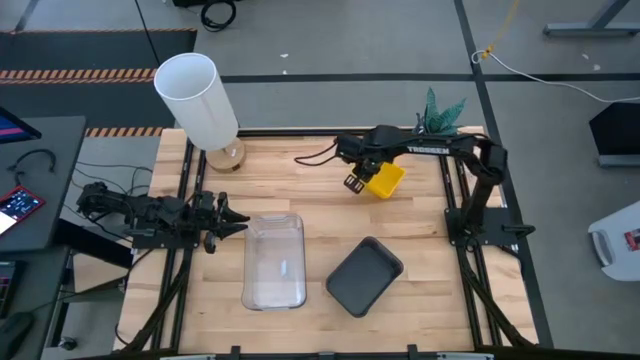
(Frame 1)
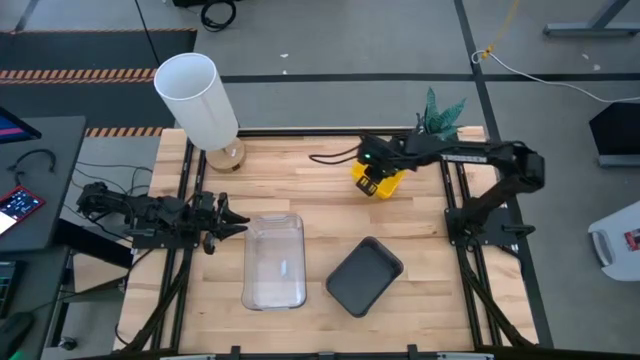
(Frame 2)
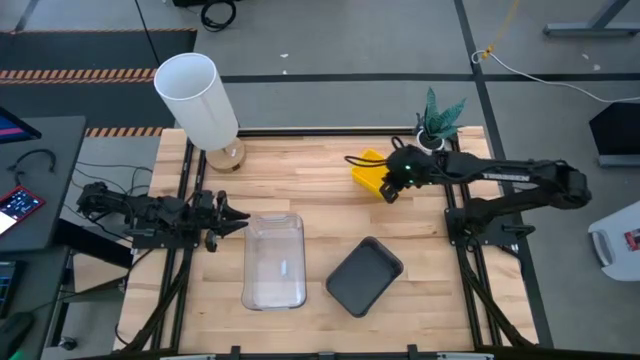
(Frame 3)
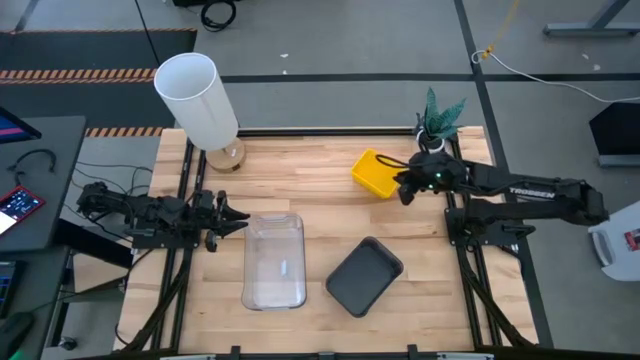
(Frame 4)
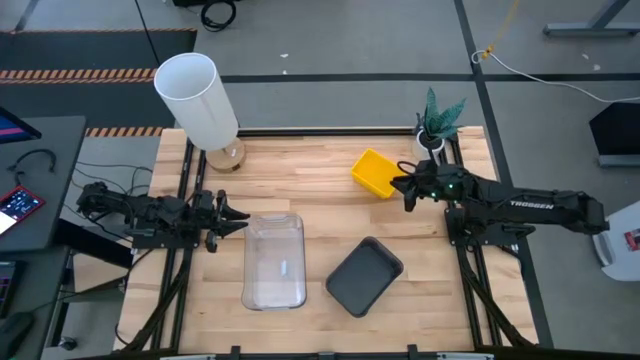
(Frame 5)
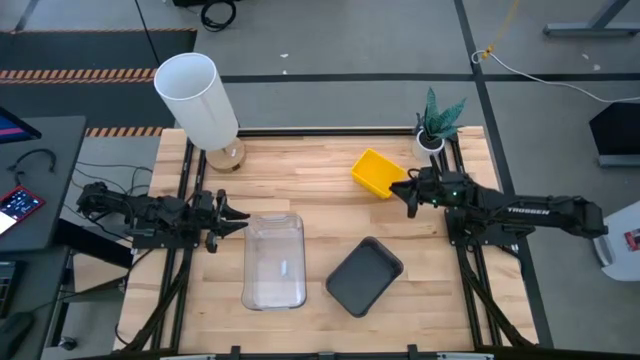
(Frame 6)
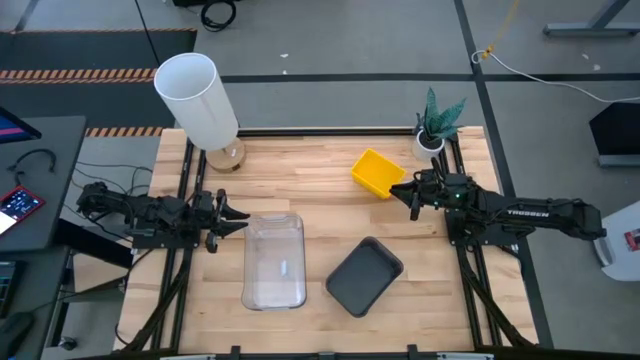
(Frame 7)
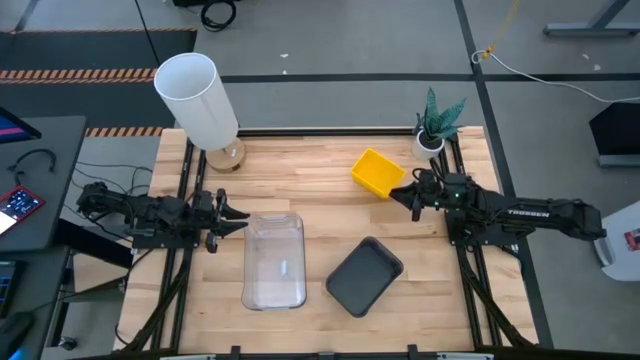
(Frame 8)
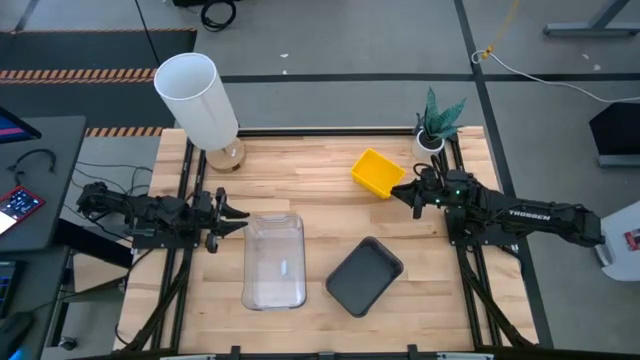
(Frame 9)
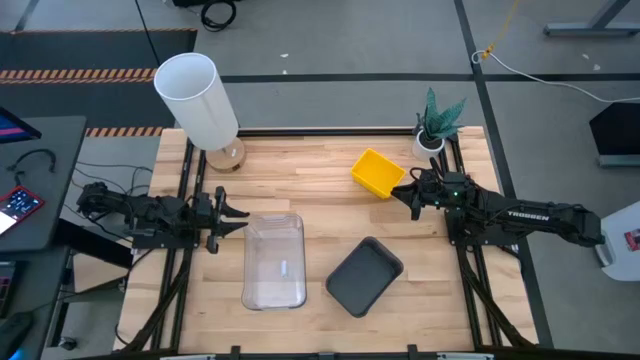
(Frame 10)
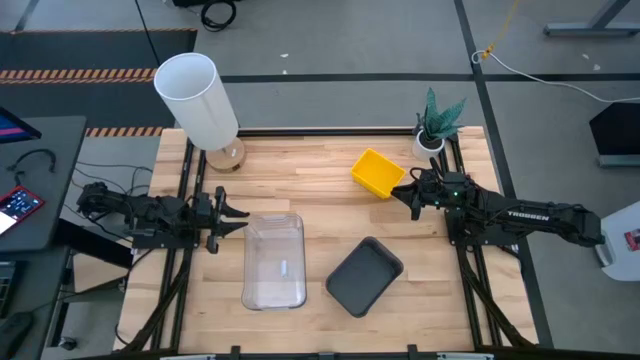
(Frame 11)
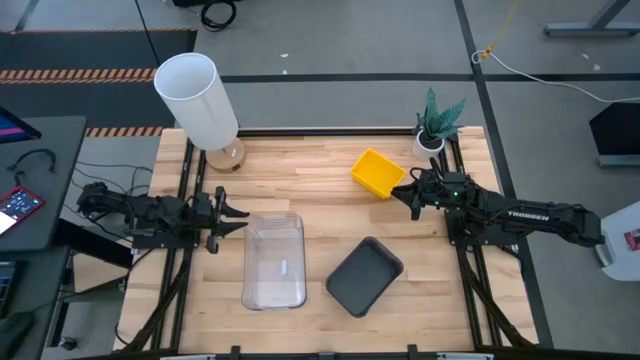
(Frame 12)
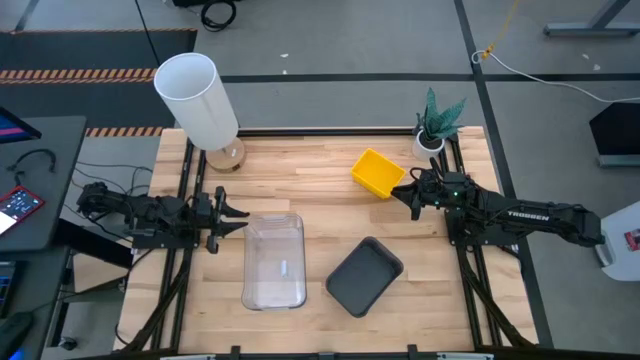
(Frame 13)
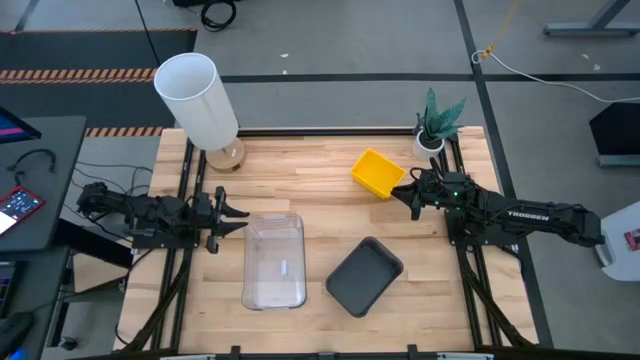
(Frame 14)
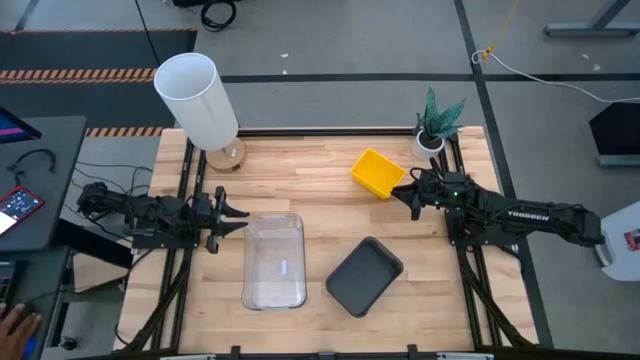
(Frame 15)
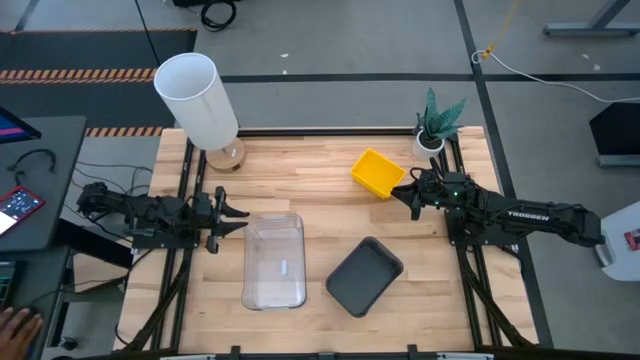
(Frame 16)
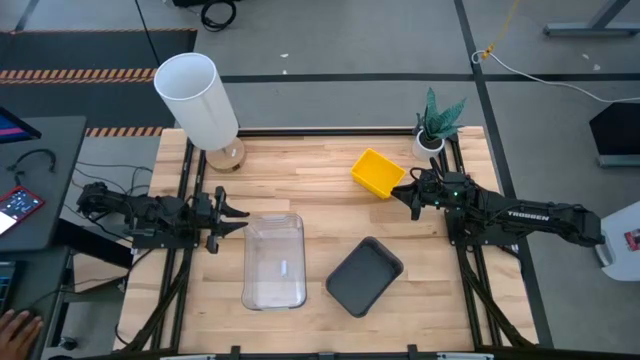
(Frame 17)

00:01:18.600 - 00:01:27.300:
Return to Home Position

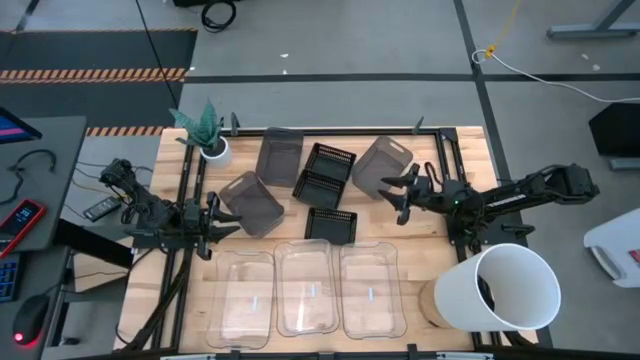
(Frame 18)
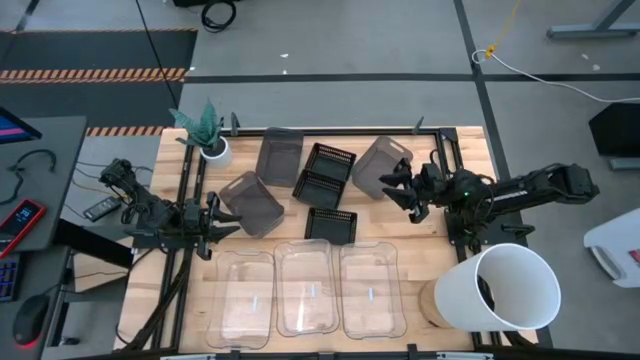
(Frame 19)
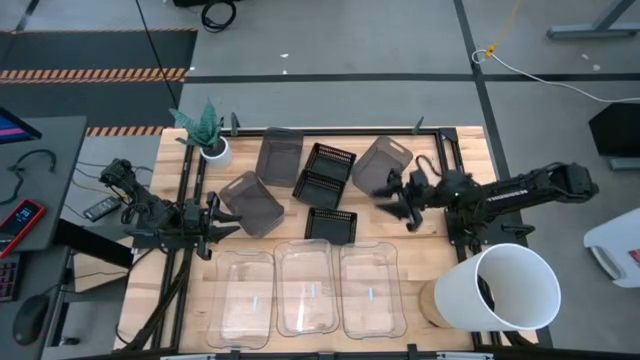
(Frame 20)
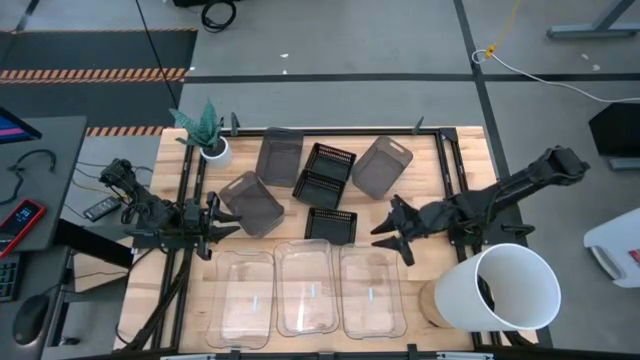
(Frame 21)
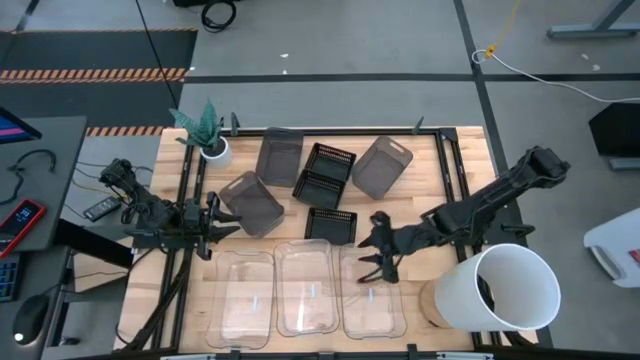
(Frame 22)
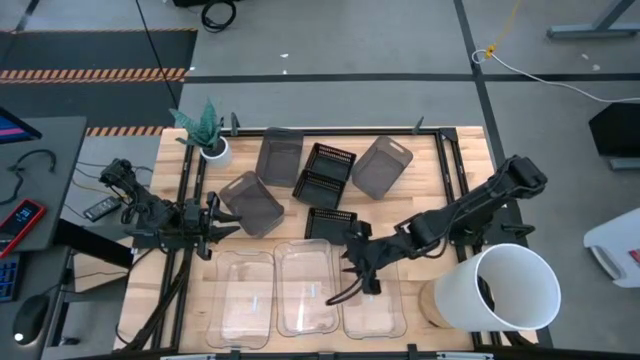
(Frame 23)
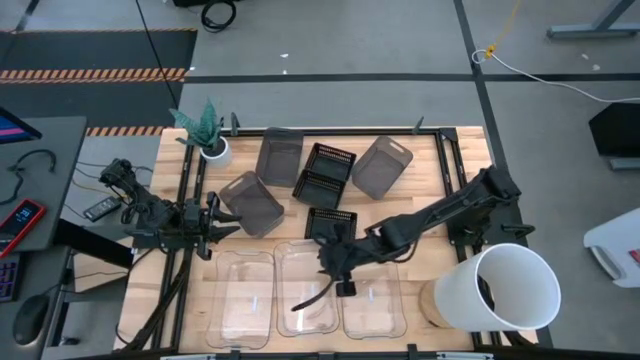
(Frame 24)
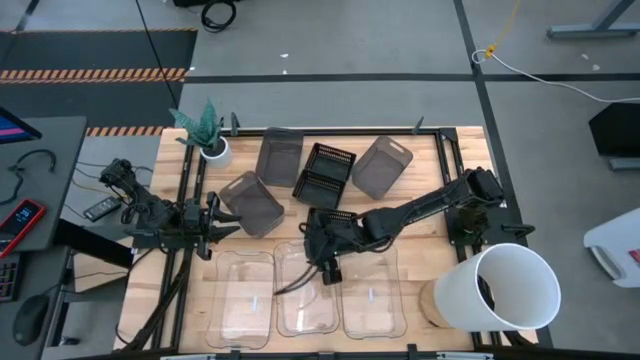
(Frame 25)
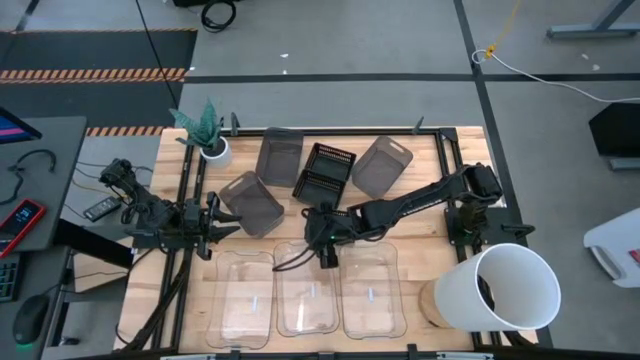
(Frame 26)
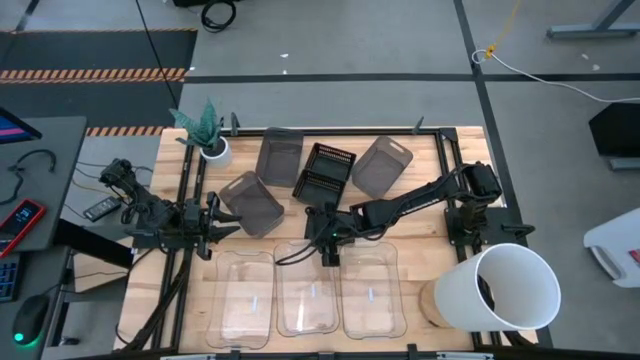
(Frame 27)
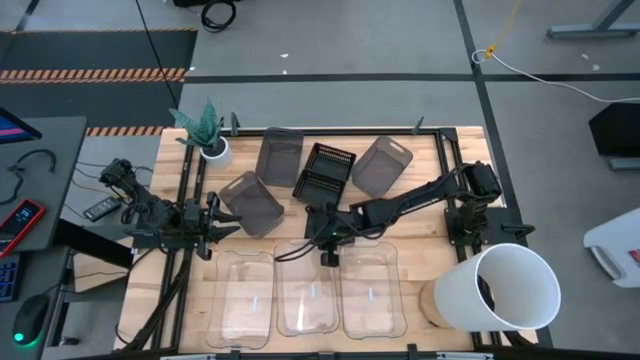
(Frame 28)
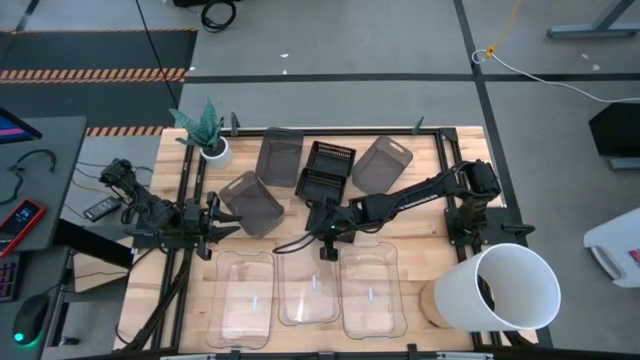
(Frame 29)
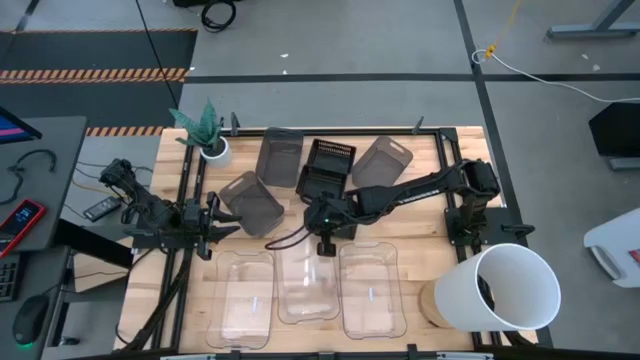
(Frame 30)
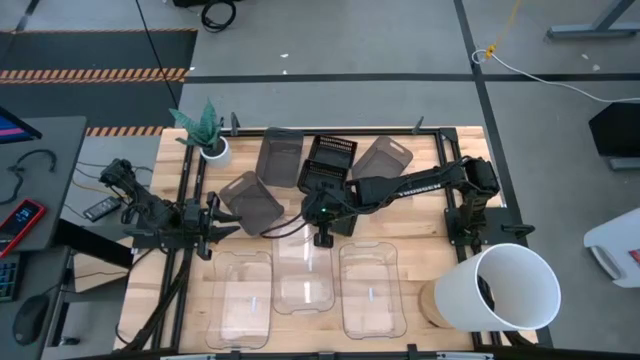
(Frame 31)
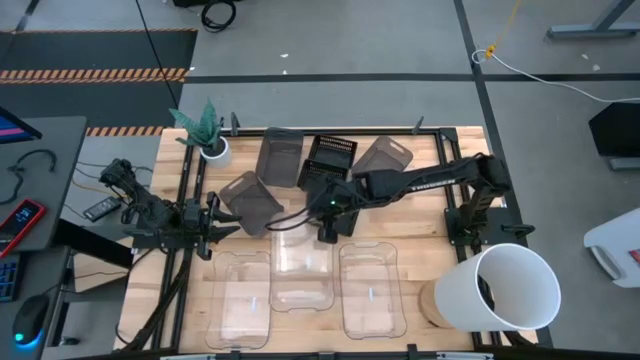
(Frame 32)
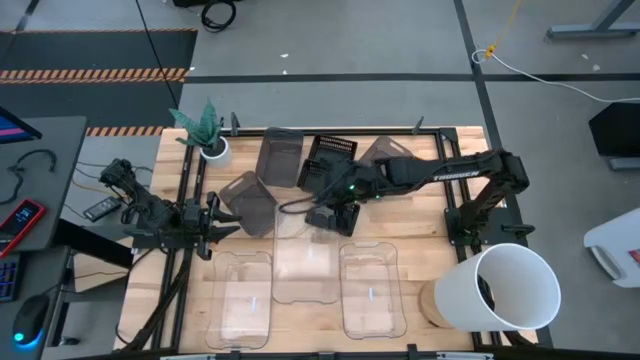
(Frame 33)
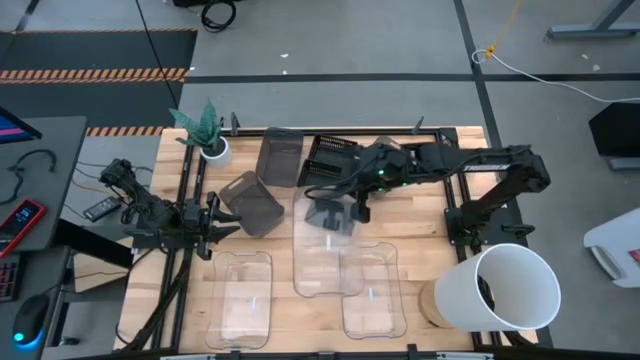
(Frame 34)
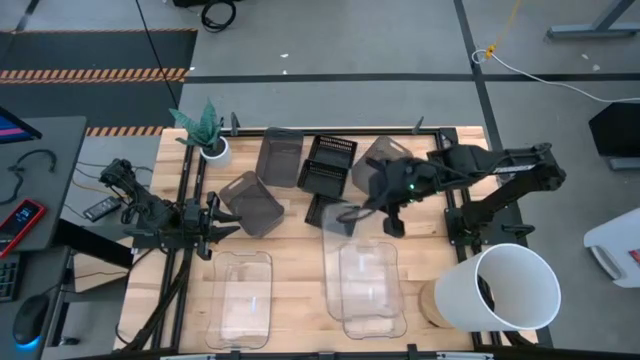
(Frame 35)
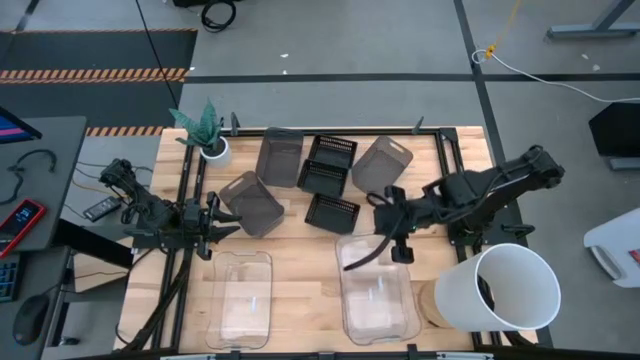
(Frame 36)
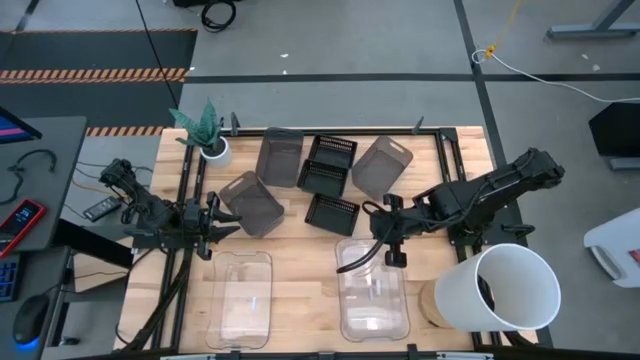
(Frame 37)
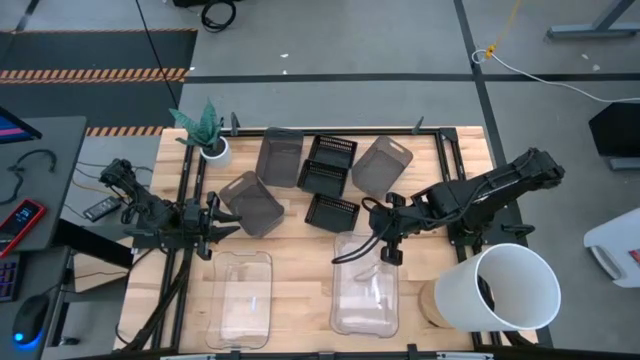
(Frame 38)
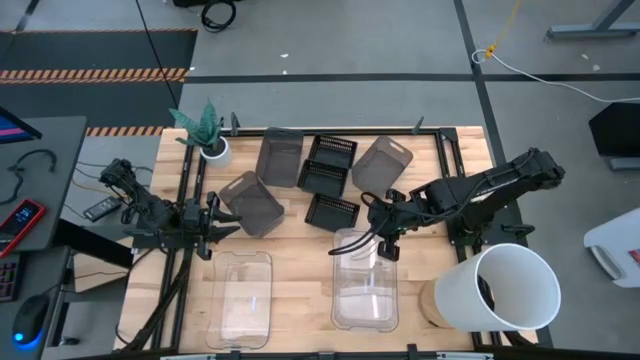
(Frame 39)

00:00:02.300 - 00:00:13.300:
Stack the middle transparent bin on top of the right transparent bin
